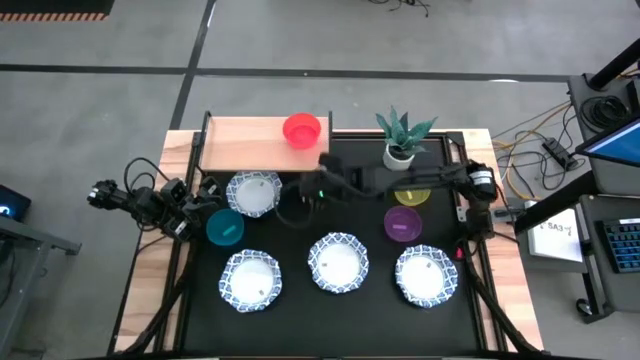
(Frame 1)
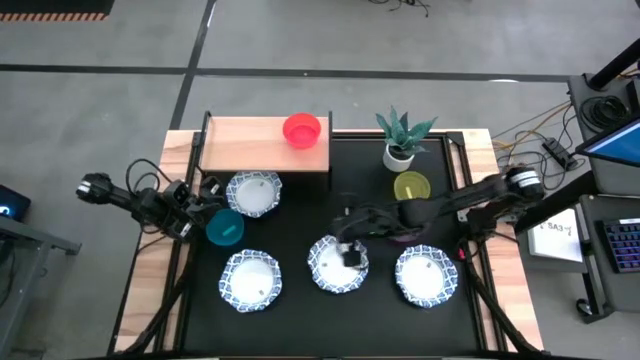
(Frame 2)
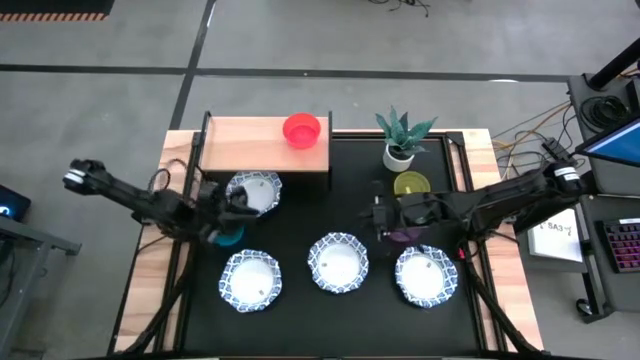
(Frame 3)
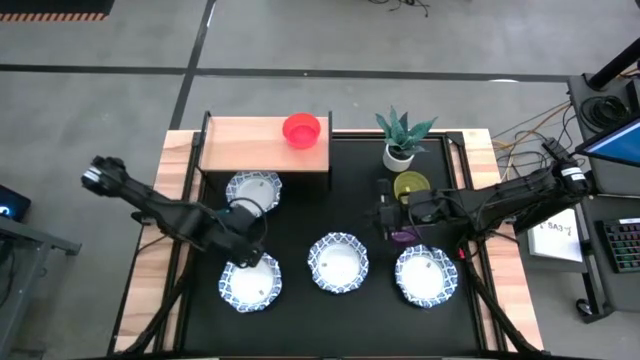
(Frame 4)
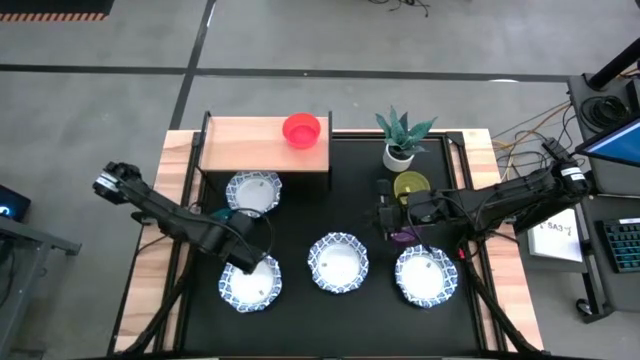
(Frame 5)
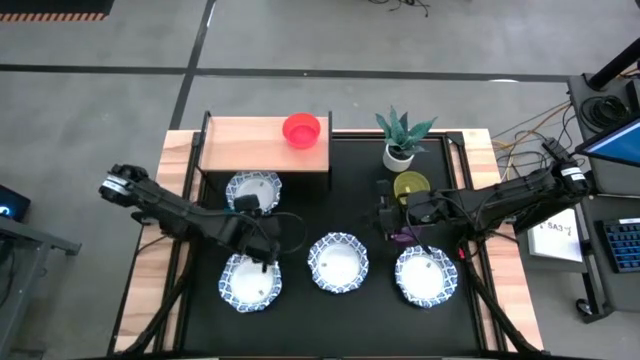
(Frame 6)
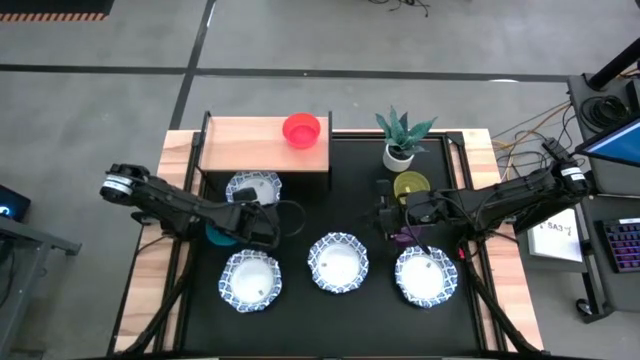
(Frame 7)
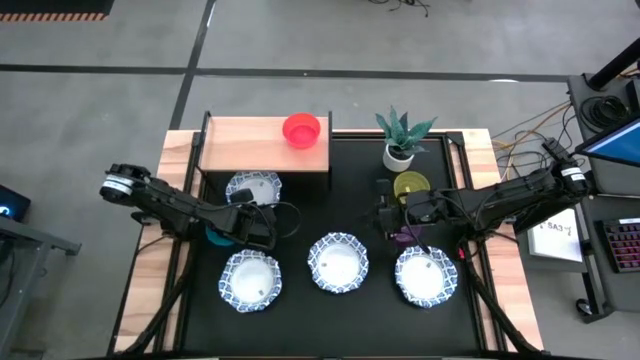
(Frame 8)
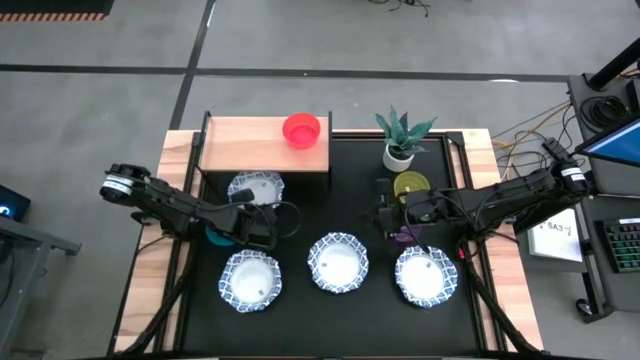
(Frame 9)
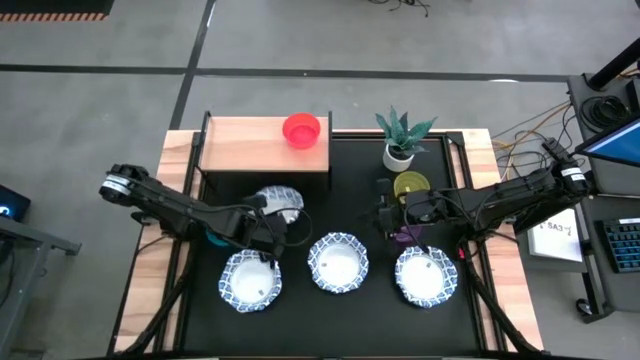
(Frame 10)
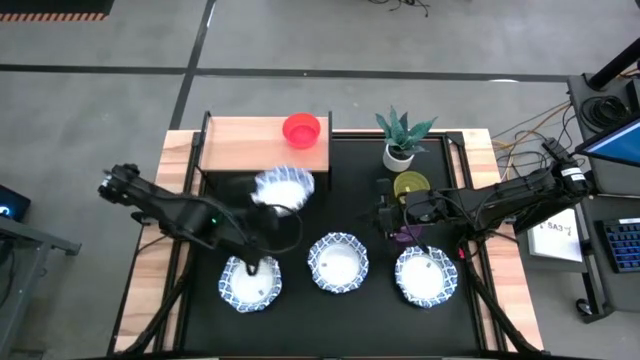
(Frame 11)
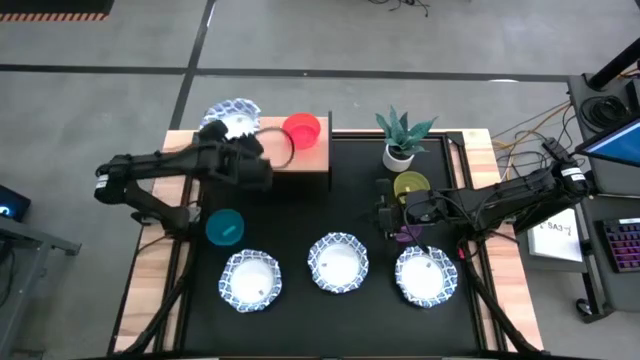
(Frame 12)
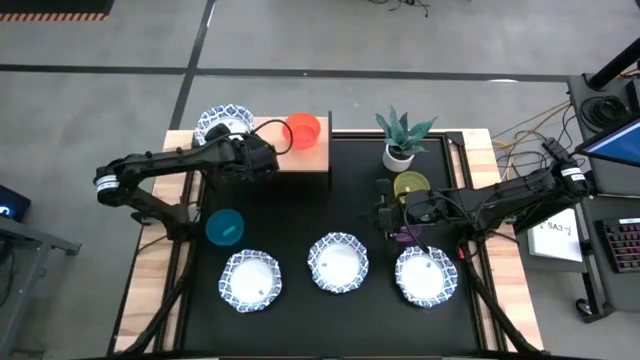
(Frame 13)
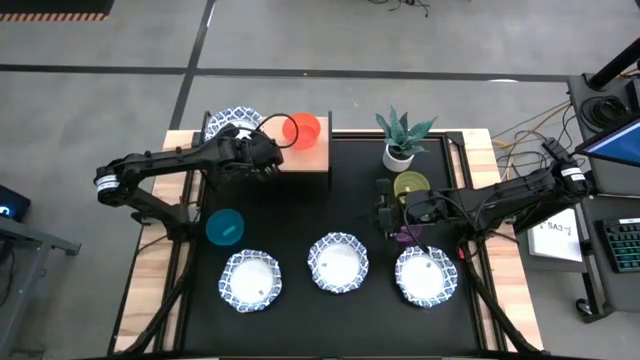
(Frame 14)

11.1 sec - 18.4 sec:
Task: Place and stack bowls onto a shelf
Put the white patterned bowl on the shelf

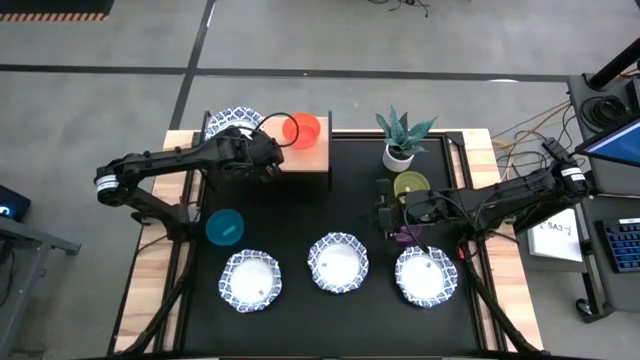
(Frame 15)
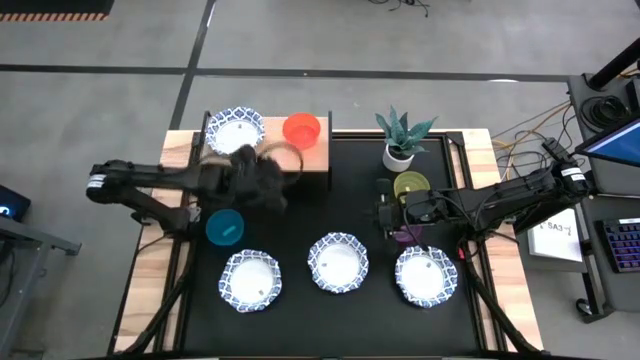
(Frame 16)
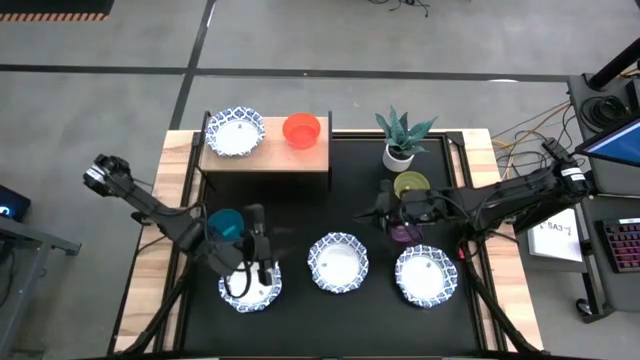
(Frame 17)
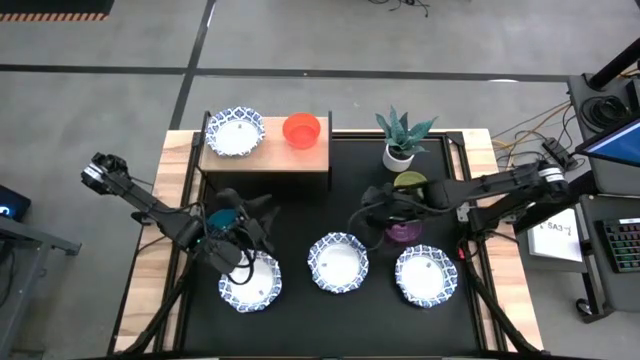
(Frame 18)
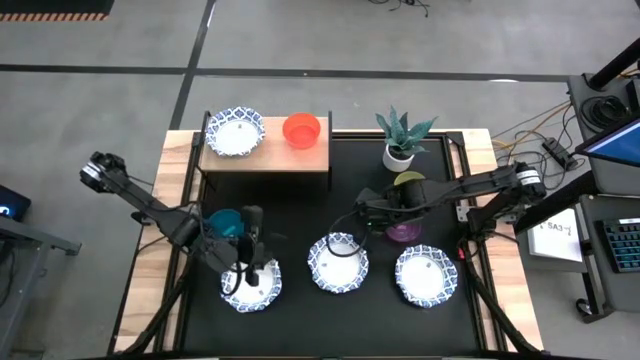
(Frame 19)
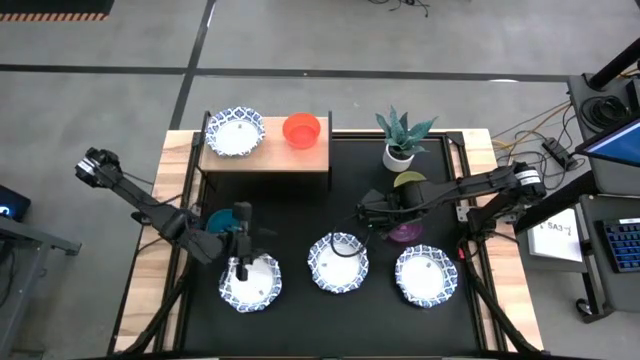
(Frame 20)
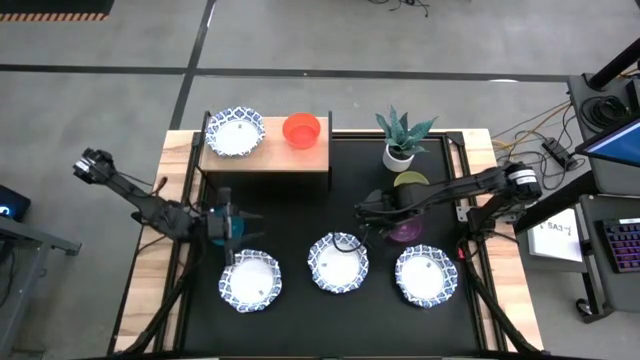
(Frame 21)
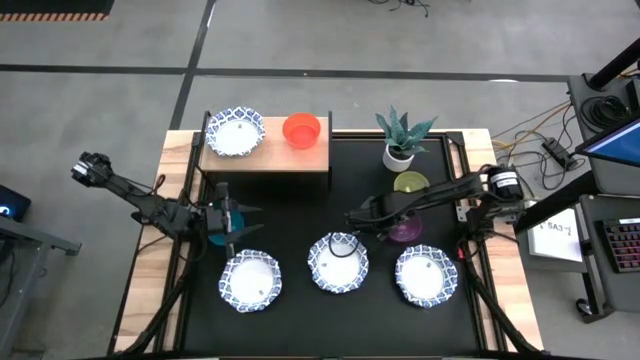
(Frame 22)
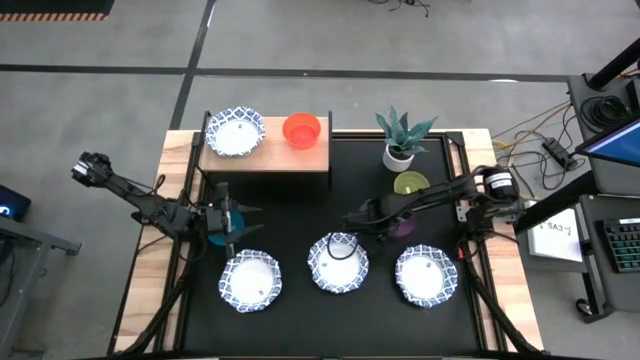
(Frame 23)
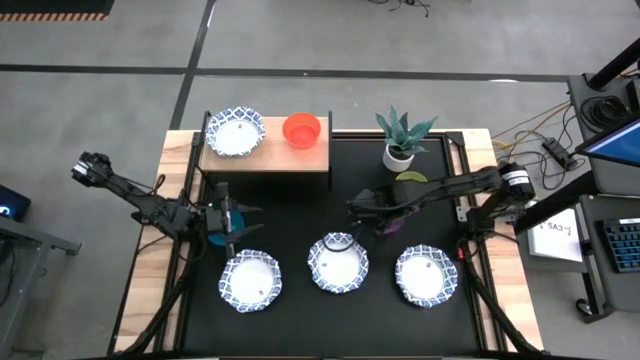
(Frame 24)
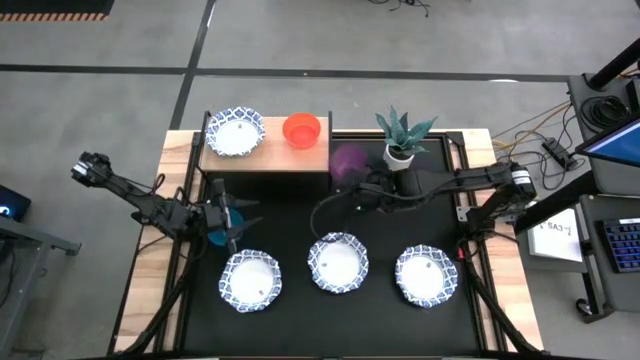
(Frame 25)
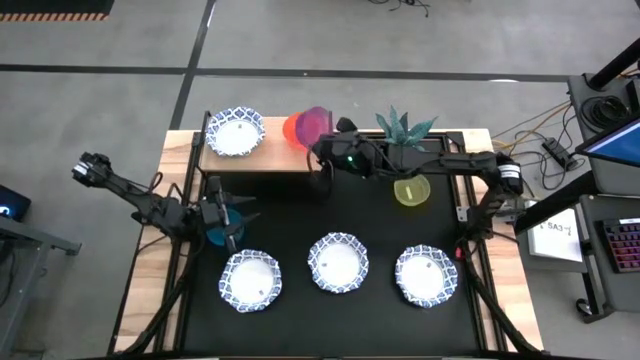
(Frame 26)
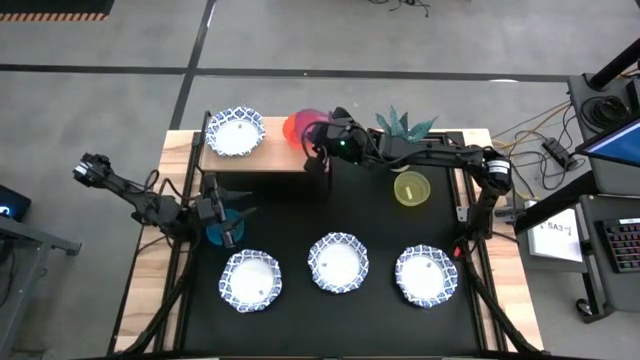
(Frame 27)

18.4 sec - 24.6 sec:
Stack the purple bowl on top of the orange bowl on the shelf

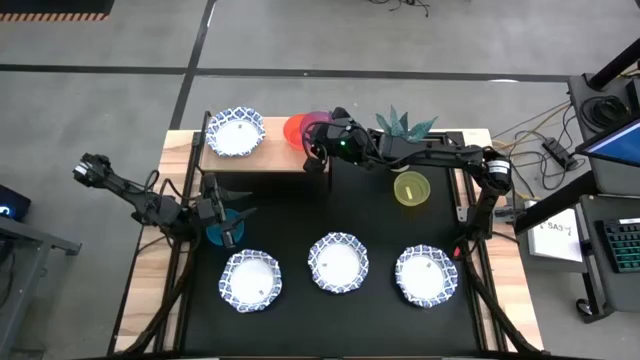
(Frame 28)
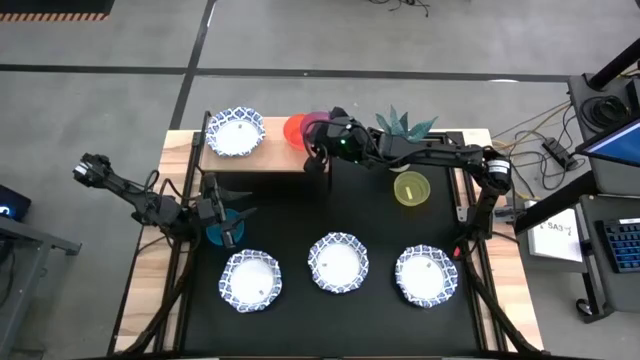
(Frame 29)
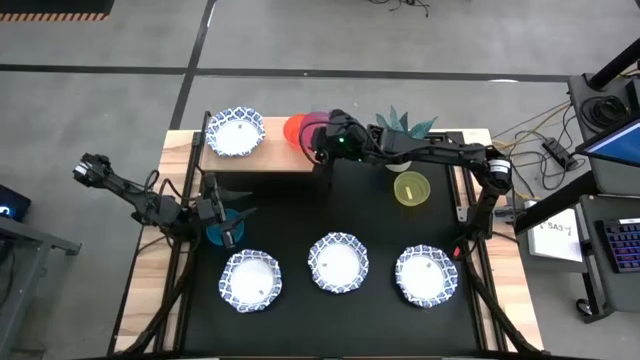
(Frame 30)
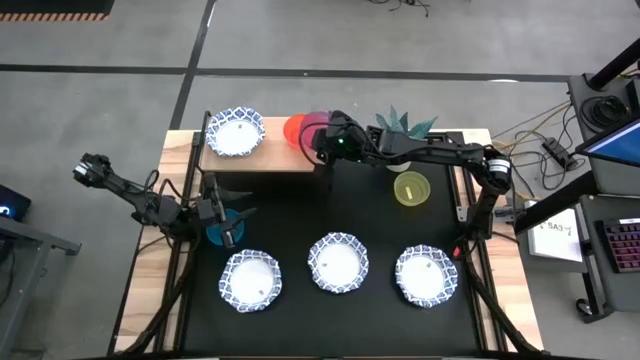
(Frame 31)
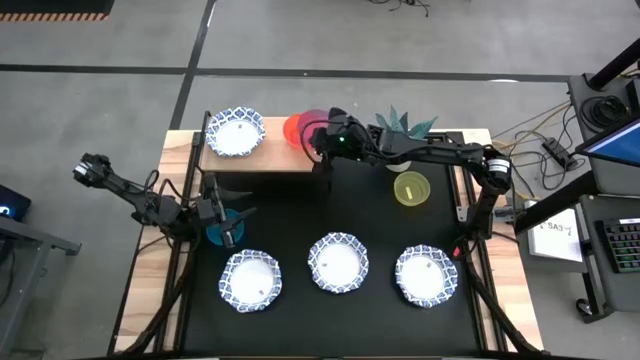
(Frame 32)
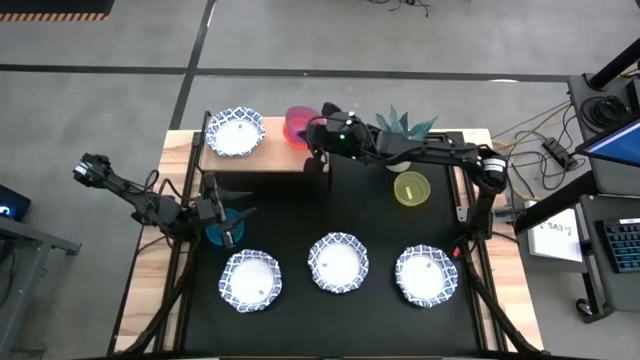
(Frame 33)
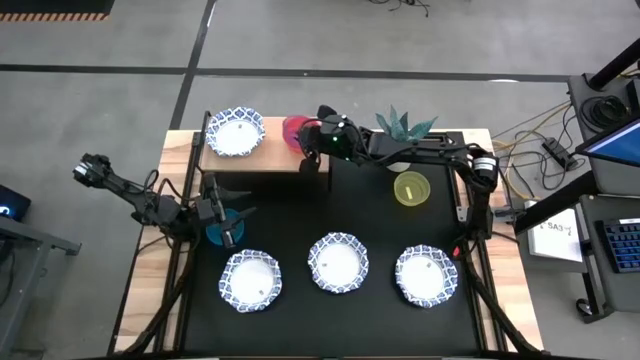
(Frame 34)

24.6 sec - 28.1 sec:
Stack the purple bowl on top of the orange bowl on the shelf

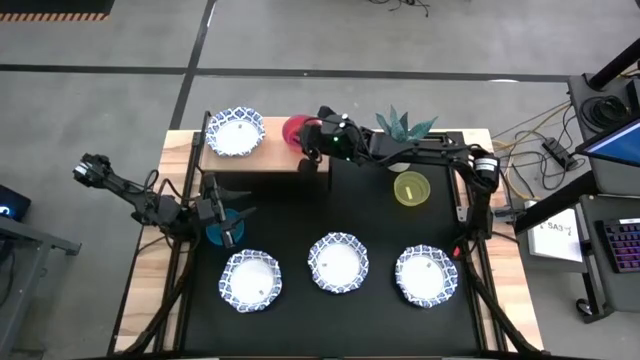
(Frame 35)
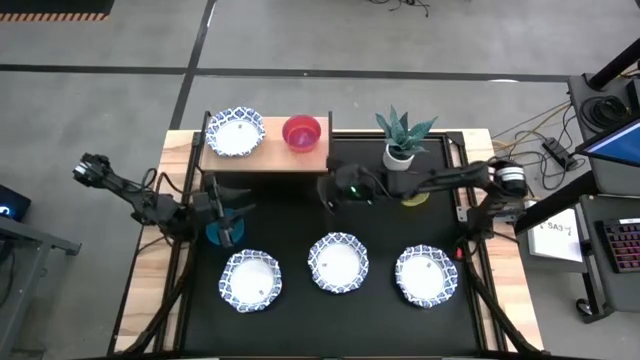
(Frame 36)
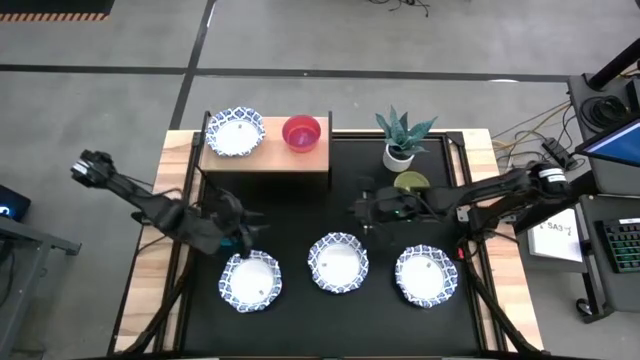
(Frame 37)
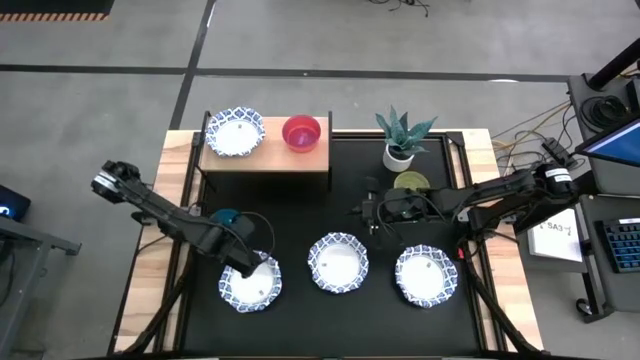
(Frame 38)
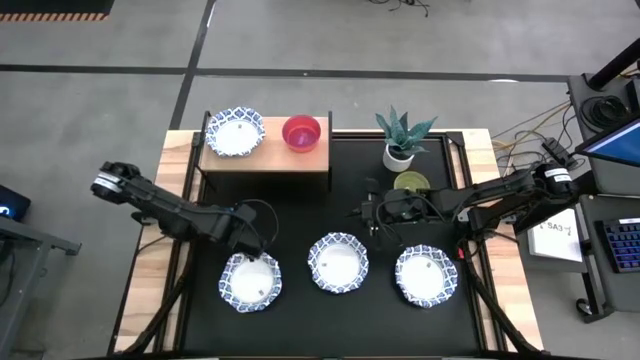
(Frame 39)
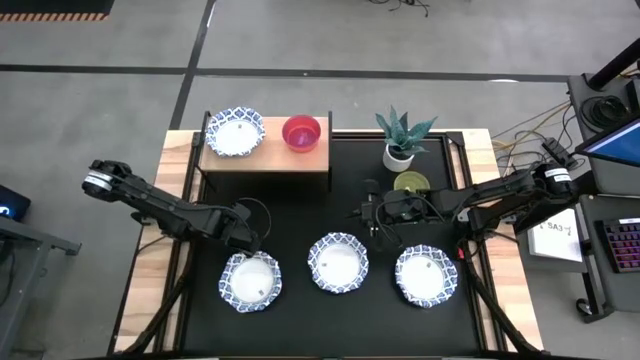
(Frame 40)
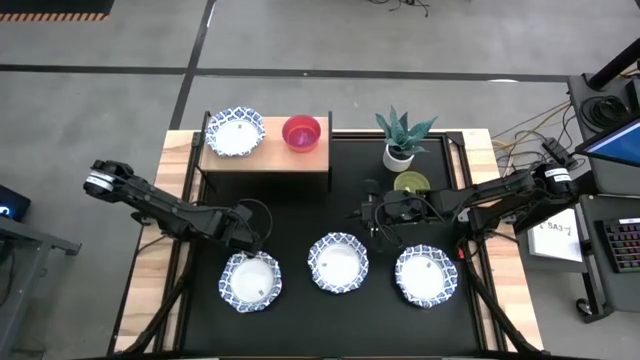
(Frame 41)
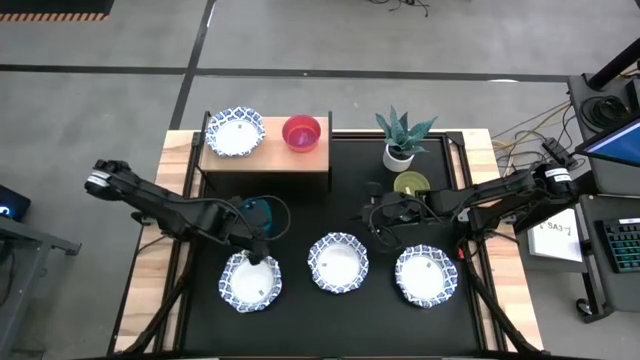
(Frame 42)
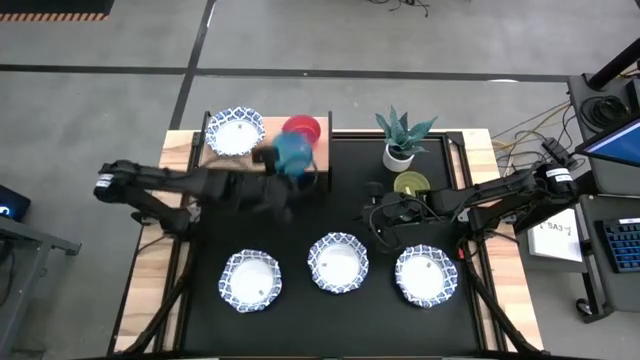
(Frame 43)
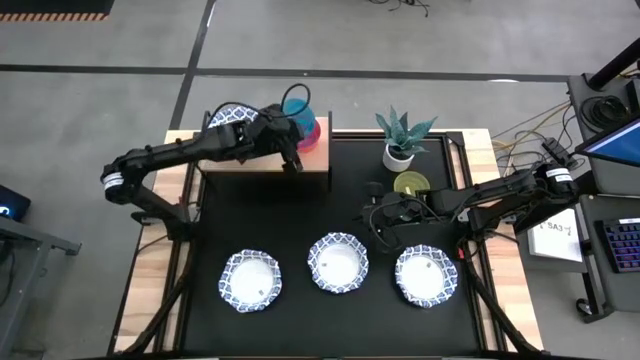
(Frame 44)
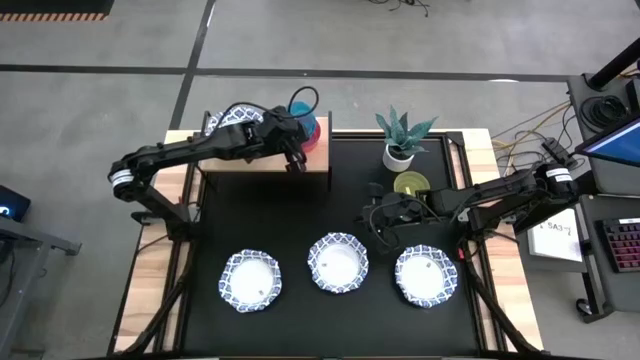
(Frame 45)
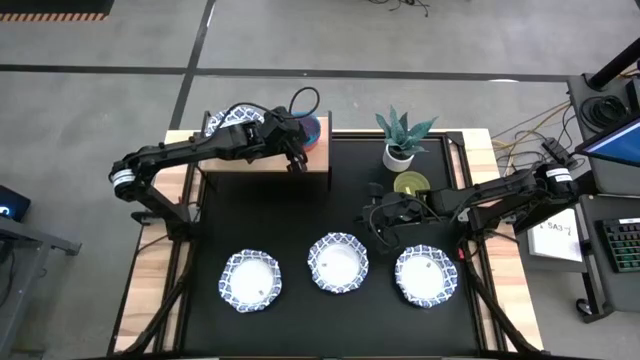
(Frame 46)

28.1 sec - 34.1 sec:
Stack the blue bowl on top of the purple bowl on the shelf
